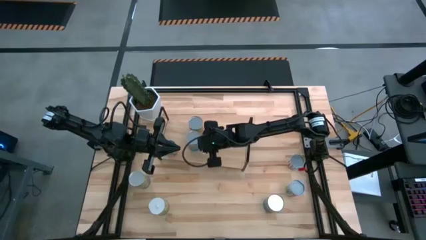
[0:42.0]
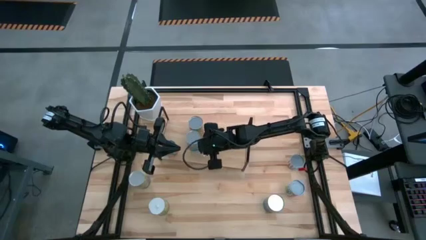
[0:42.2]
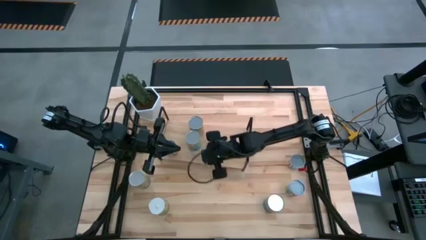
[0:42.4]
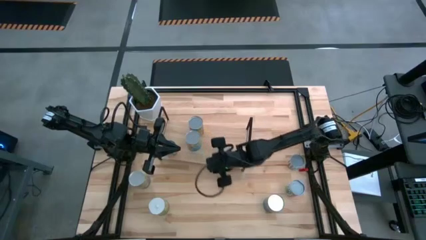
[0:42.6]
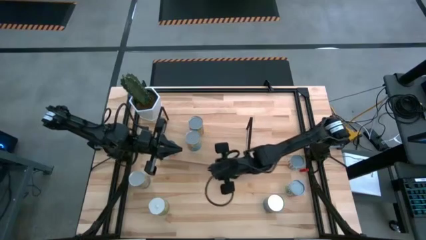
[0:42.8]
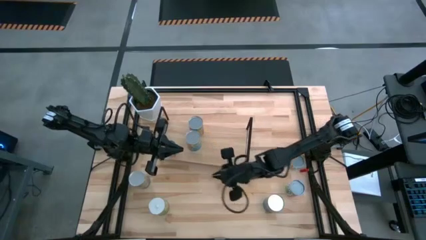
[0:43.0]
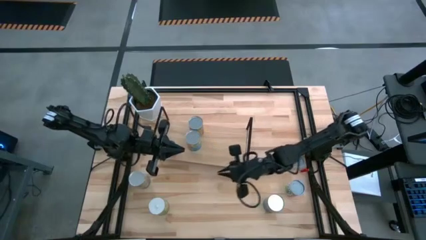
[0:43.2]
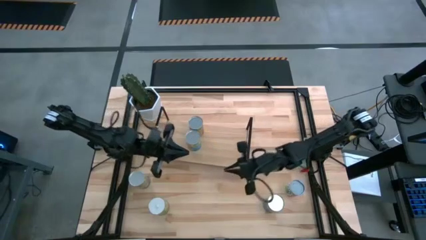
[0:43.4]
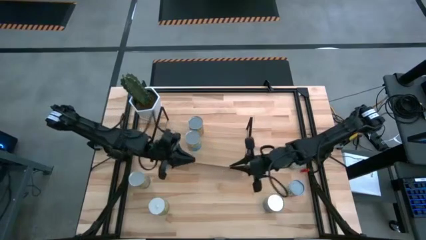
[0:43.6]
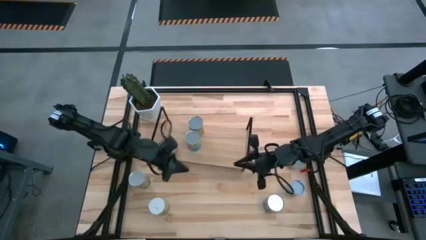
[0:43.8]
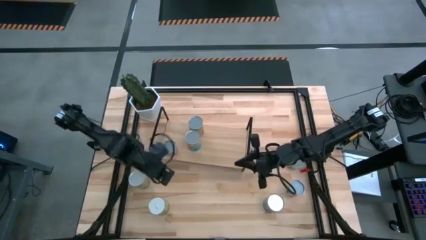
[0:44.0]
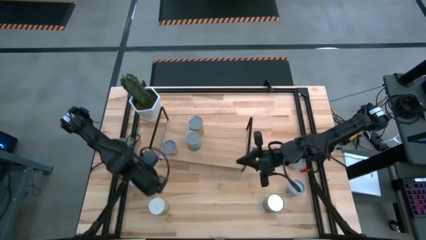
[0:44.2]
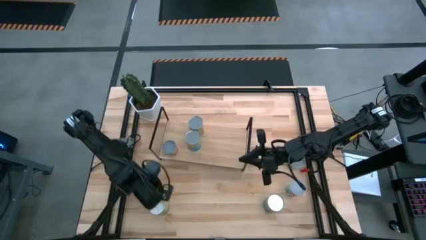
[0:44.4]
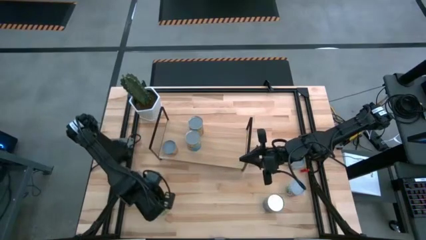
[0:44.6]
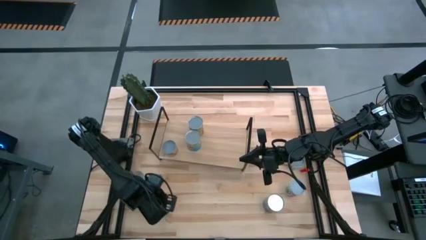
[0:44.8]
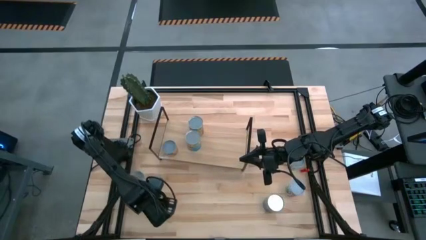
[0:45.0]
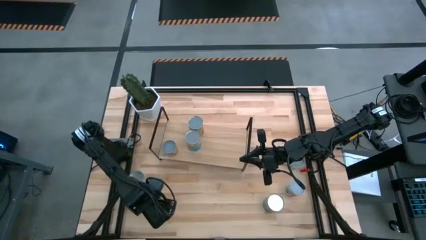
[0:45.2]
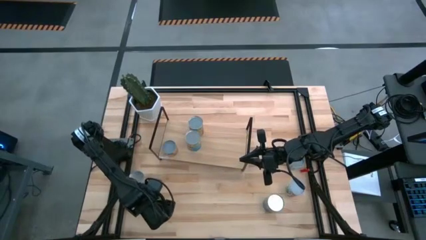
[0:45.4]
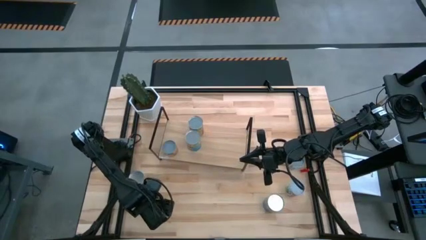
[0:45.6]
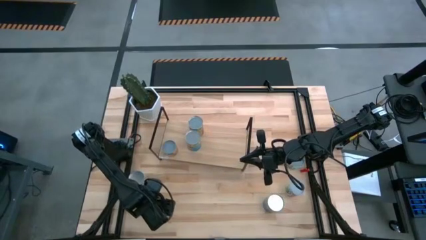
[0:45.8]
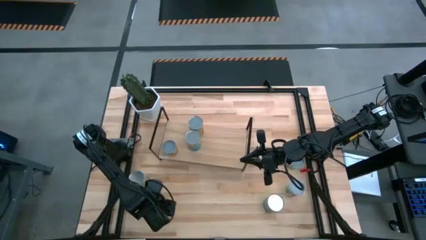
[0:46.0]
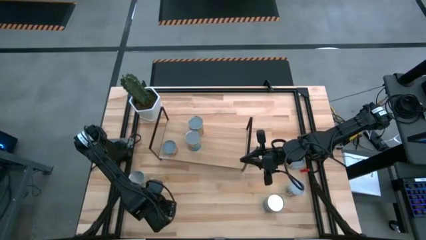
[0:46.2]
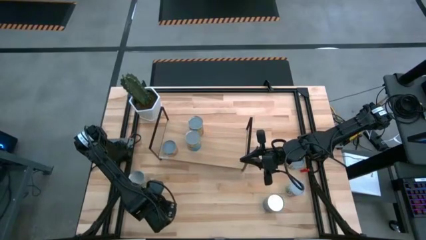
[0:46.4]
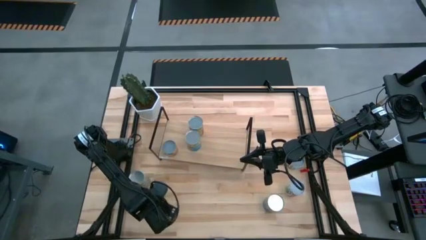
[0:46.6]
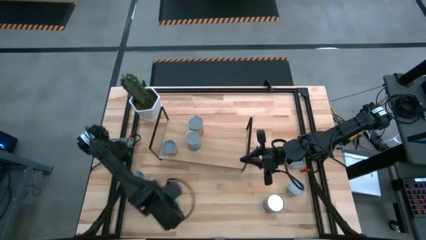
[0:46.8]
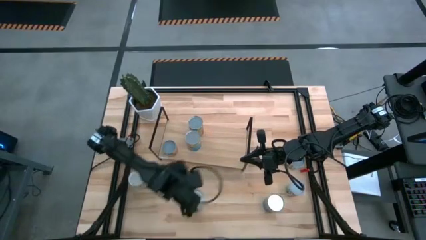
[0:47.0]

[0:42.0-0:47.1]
Task: Pick and place cans onto a shelf
Put the canned oranges on the shelf

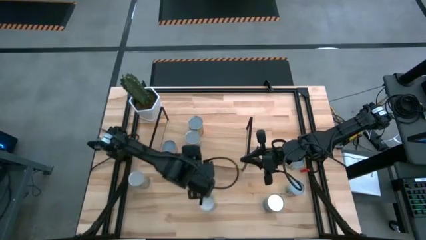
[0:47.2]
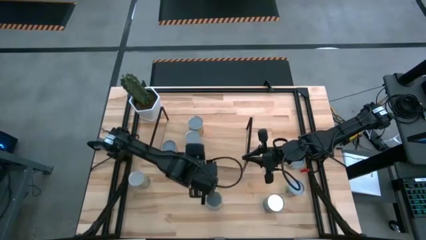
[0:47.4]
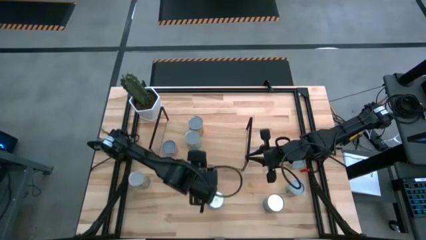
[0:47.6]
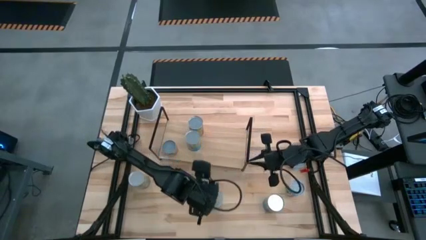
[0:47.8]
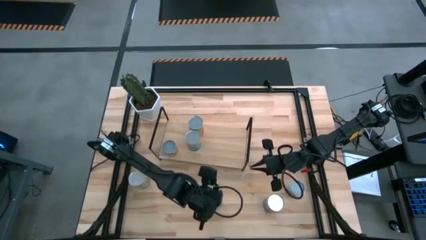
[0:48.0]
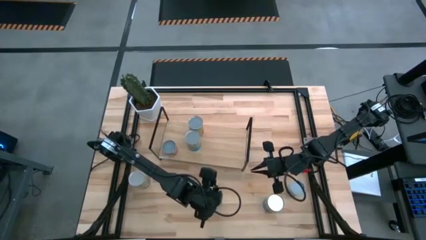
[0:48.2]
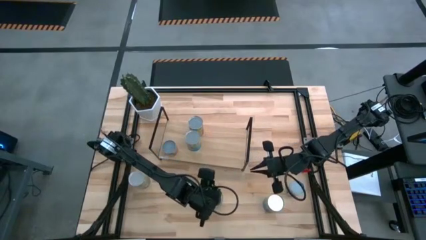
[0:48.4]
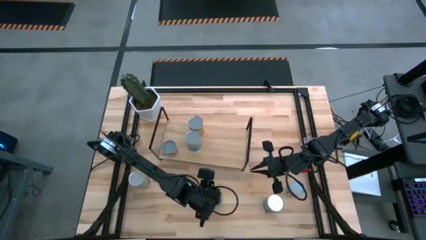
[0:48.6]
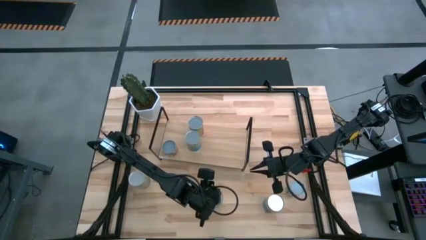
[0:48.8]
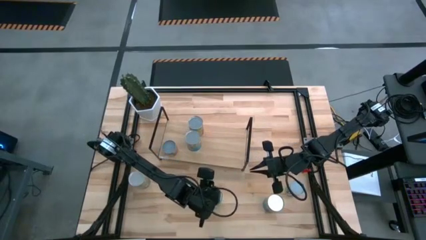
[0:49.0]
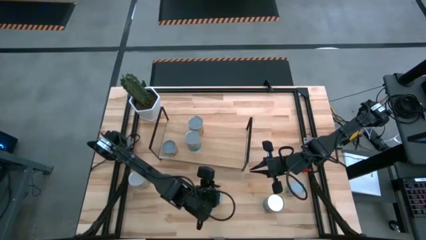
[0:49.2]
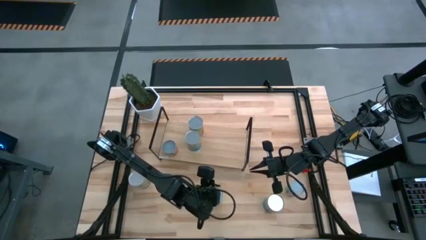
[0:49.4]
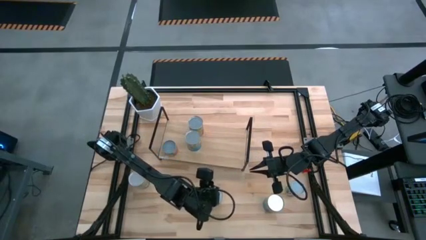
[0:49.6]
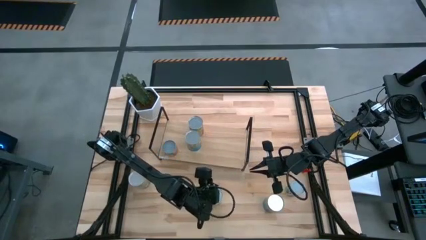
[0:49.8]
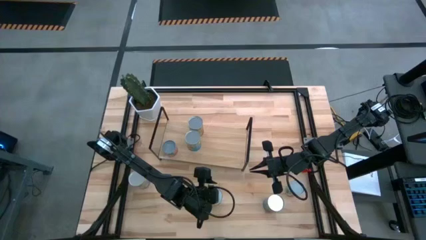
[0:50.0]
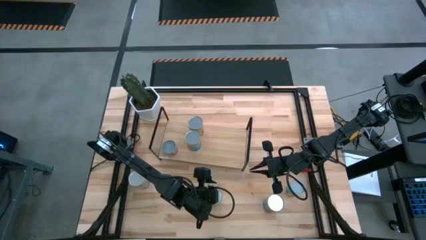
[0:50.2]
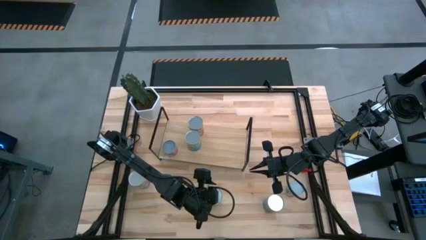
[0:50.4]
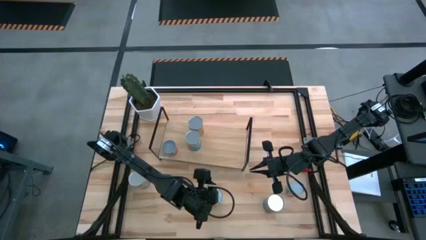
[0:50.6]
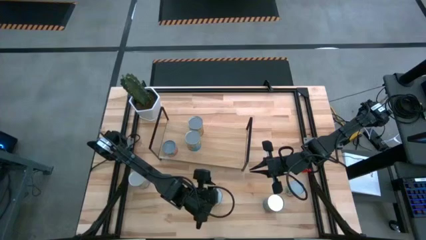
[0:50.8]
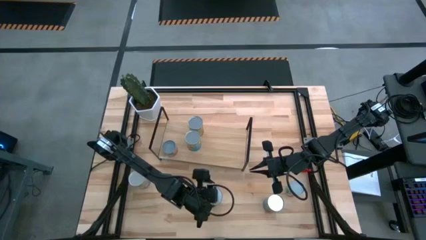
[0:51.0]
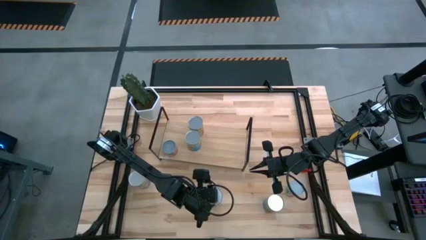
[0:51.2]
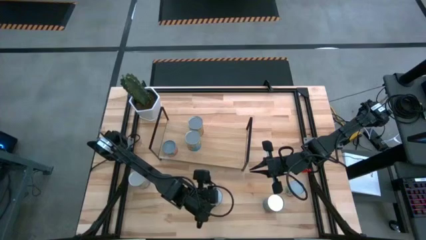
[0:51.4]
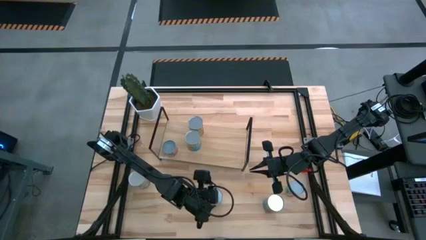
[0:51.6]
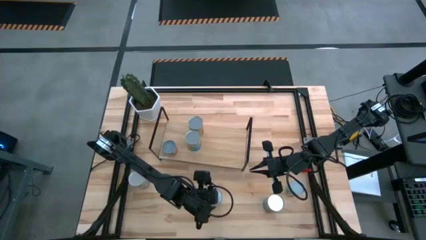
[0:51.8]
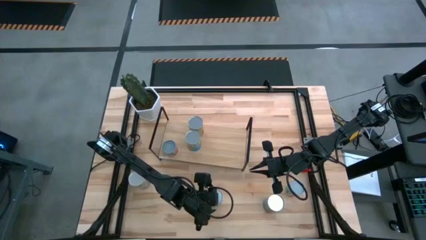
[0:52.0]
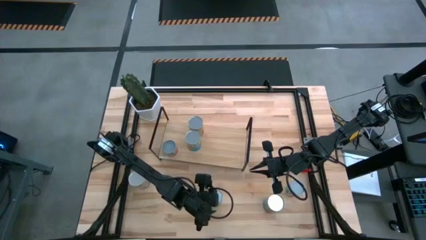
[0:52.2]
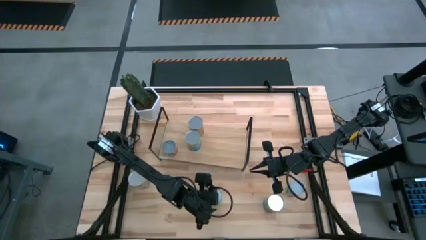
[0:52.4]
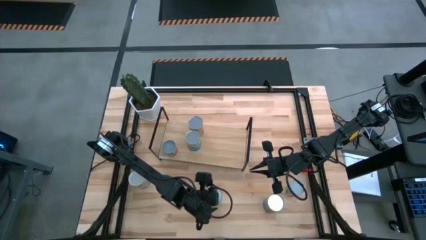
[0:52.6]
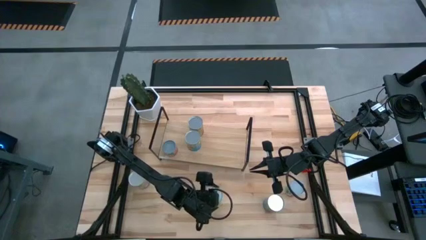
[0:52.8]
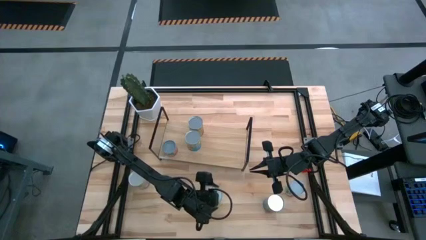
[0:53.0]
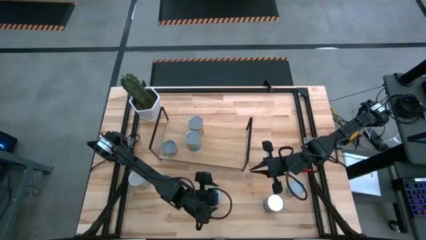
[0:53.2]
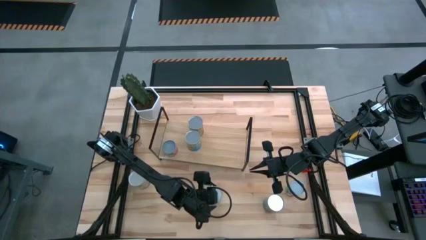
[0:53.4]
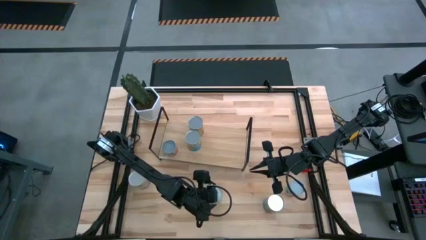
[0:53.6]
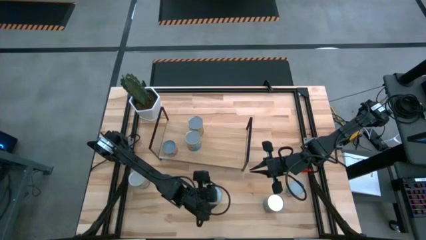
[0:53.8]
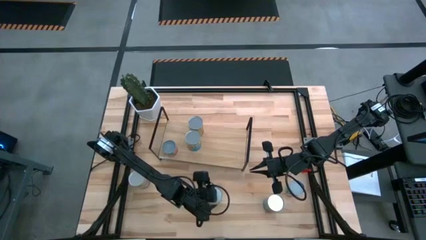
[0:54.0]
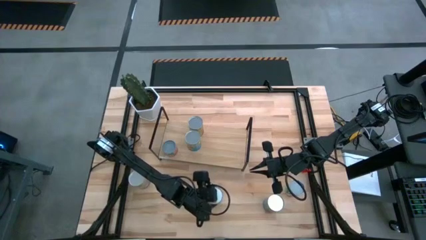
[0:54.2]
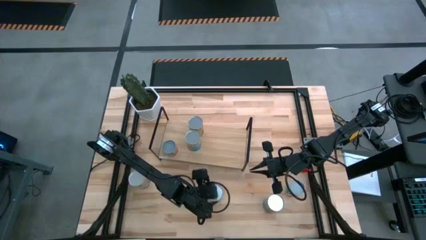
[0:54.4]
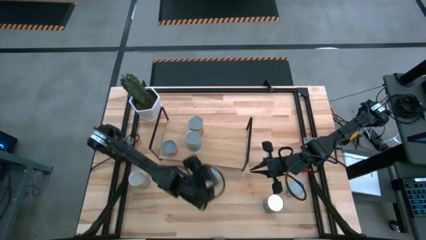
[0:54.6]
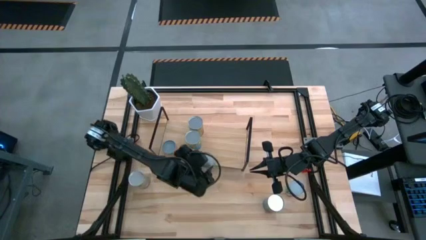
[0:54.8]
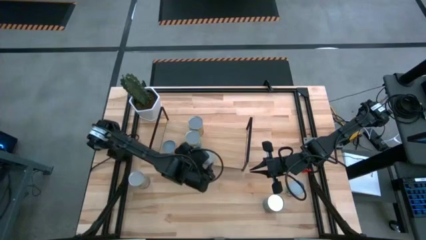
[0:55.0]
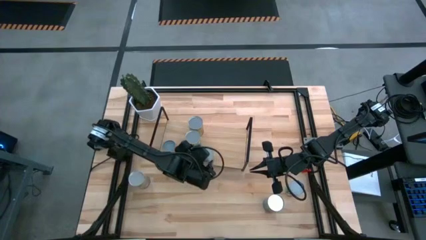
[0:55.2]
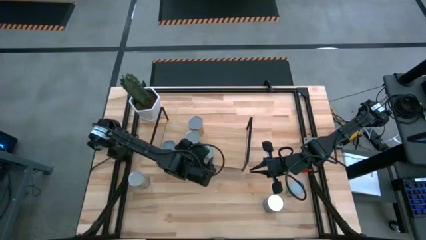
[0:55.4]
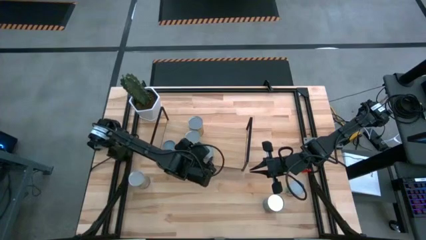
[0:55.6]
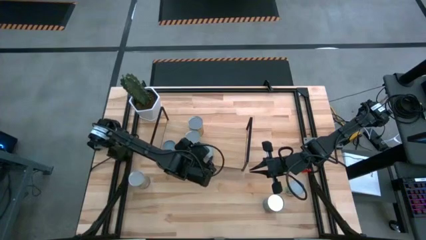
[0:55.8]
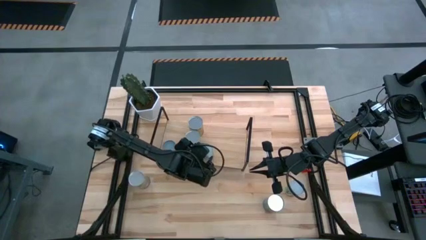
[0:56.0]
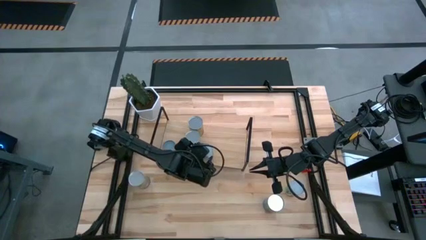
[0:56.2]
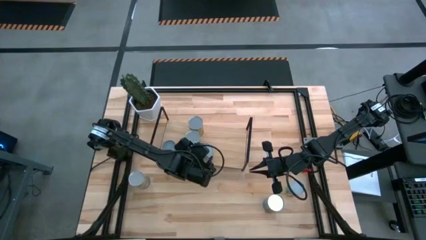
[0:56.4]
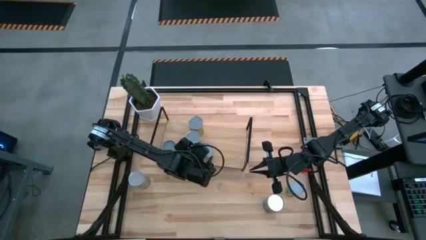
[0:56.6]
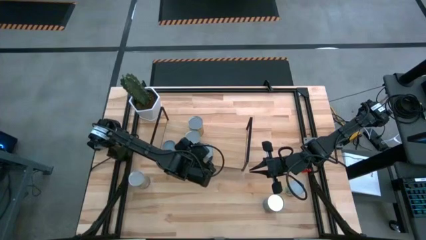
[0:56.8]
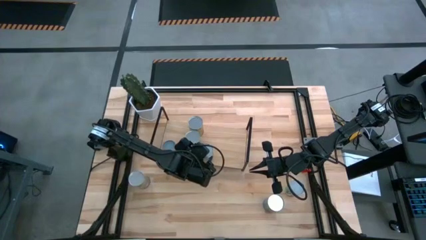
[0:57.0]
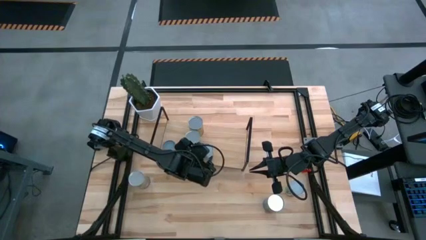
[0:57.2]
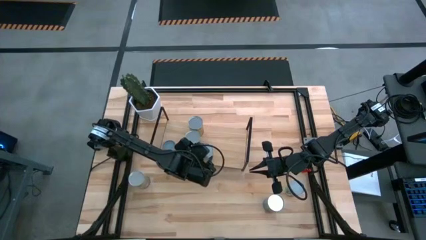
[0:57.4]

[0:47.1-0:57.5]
Put the canned oranges on the shelf
